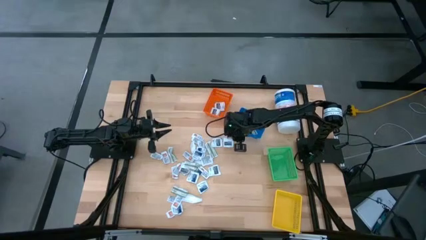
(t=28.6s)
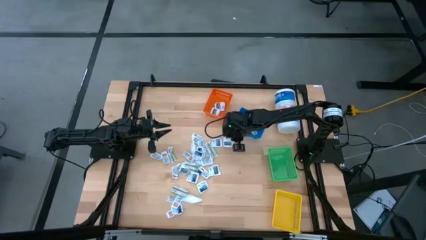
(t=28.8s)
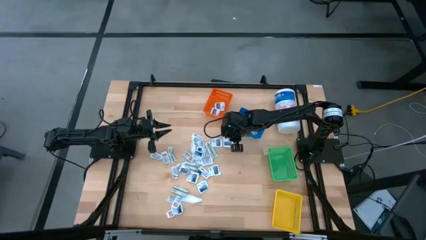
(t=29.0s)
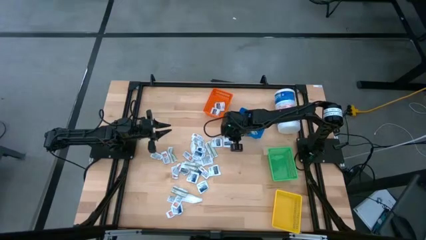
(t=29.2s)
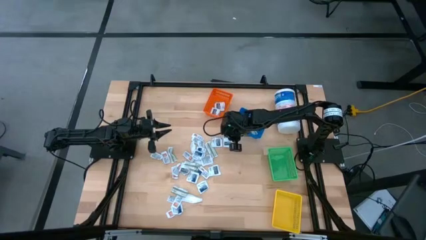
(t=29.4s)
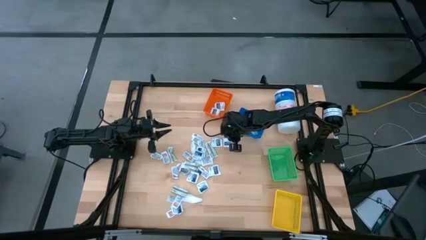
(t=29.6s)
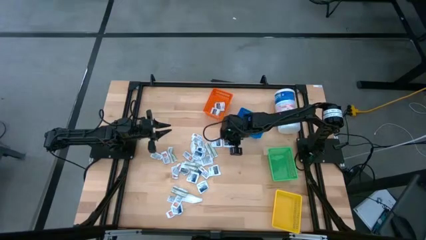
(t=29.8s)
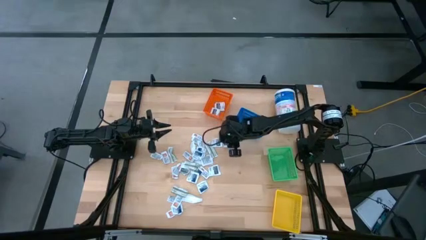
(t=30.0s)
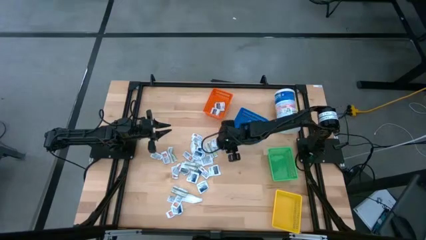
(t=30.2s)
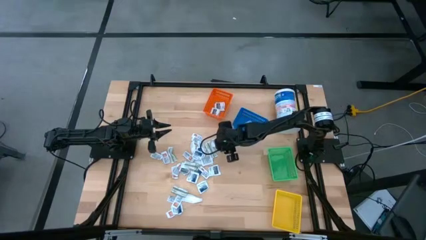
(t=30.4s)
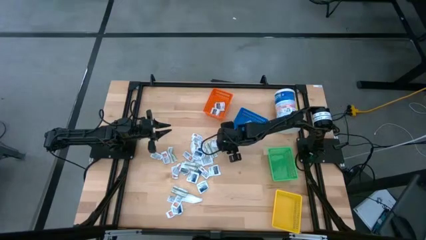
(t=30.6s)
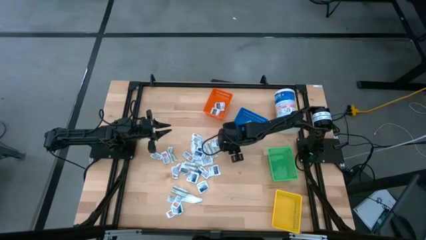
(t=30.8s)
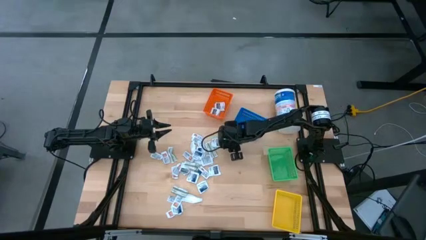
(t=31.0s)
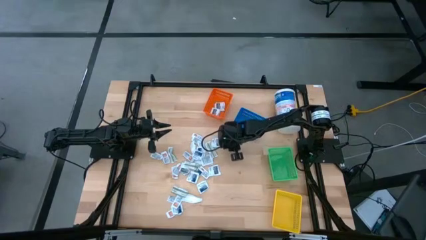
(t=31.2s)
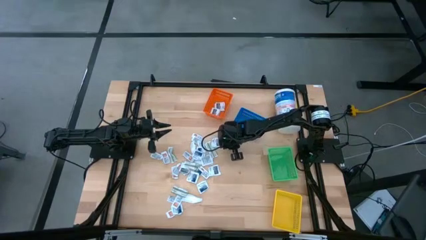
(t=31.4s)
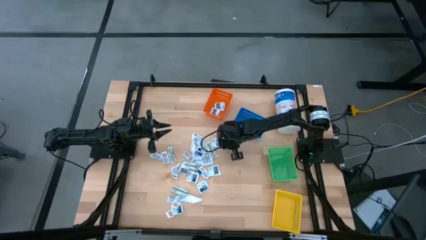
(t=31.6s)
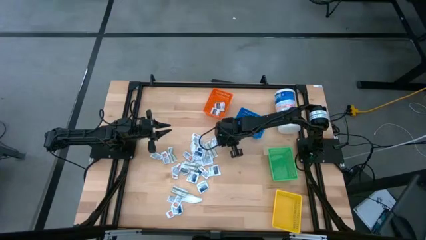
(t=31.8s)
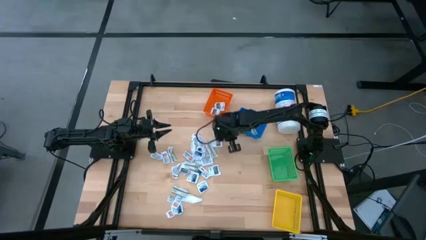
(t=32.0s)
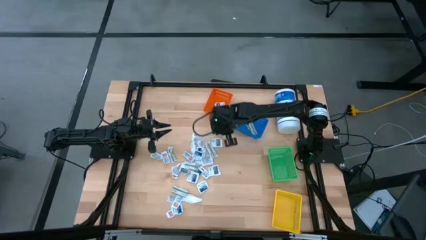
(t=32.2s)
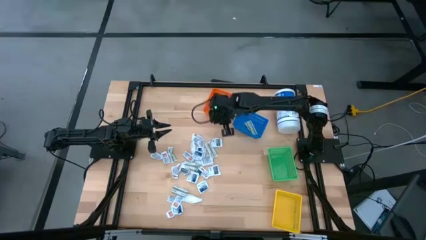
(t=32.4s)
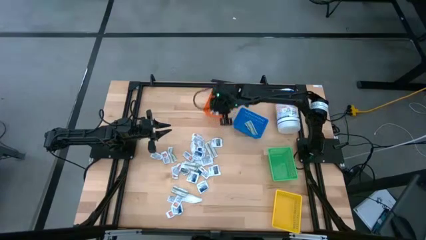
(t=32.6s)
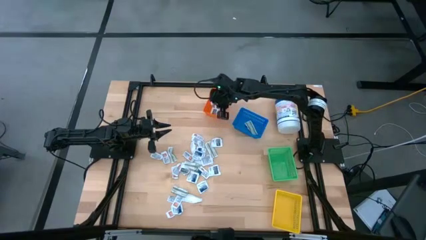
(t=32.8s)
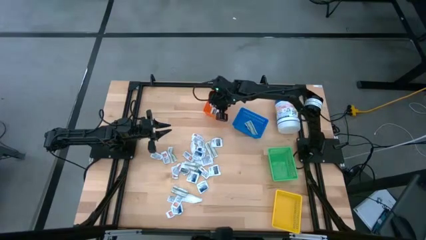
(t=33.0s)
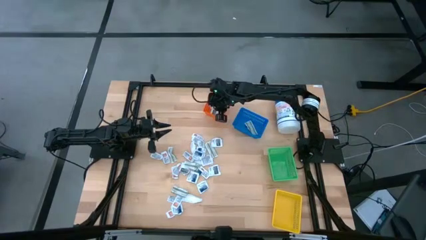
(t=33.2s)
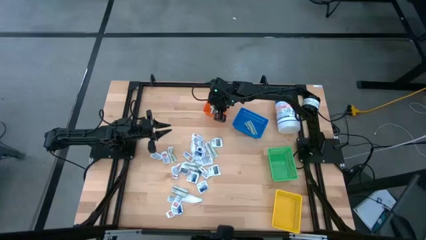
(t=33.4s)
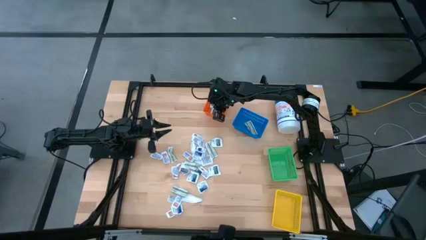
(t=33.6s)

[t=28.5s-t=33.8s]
Task: Pick & Place First Aid Supplies
Put the gray towelette pack into the orange basket

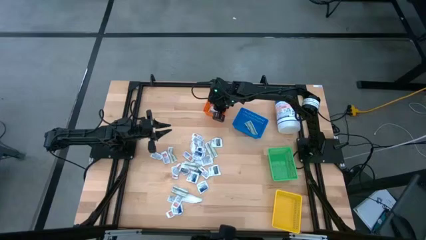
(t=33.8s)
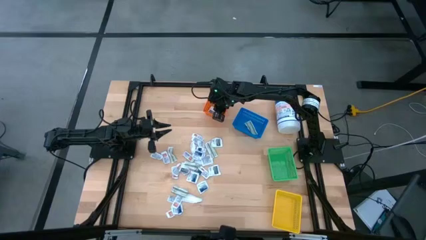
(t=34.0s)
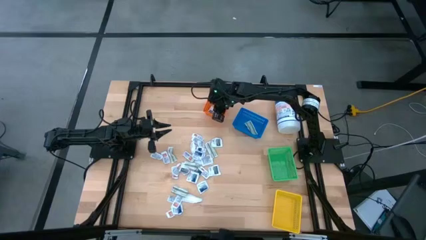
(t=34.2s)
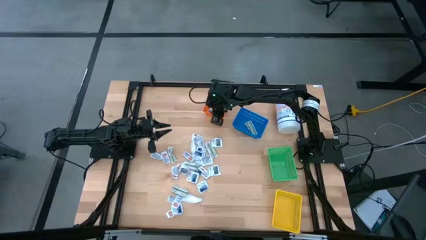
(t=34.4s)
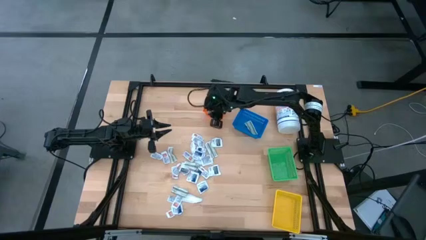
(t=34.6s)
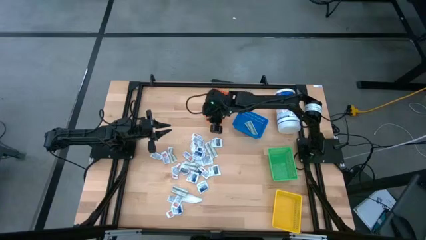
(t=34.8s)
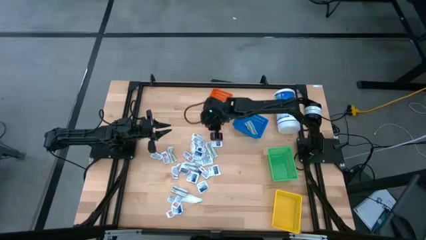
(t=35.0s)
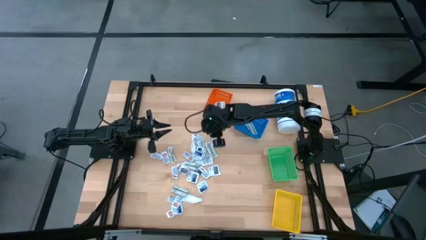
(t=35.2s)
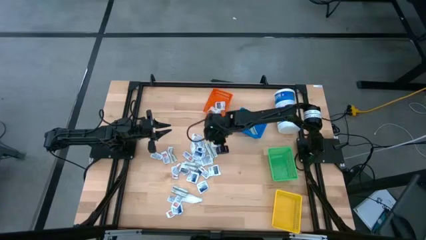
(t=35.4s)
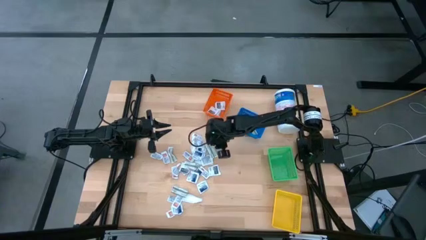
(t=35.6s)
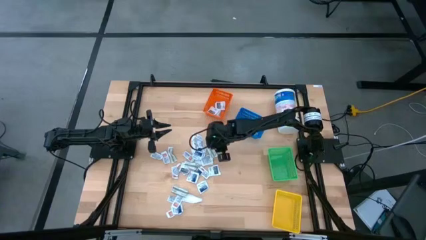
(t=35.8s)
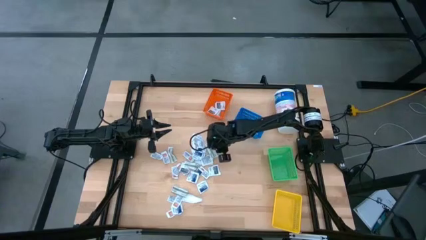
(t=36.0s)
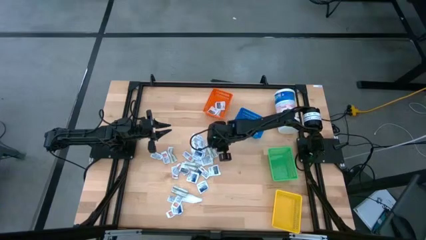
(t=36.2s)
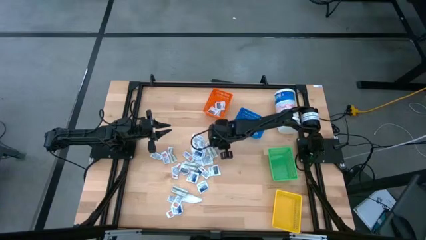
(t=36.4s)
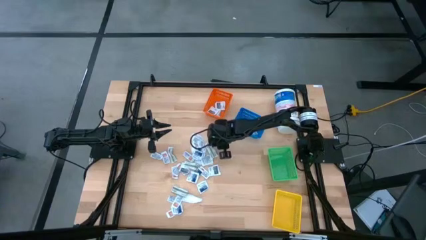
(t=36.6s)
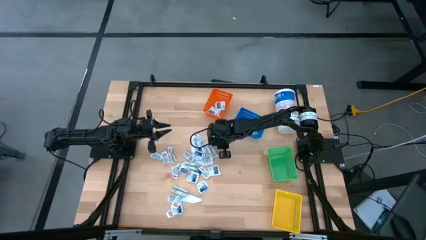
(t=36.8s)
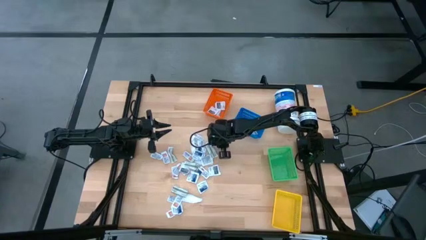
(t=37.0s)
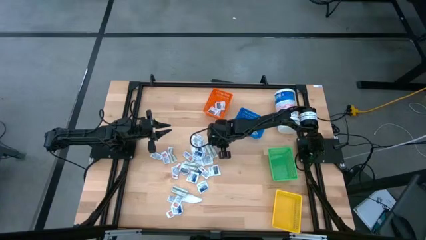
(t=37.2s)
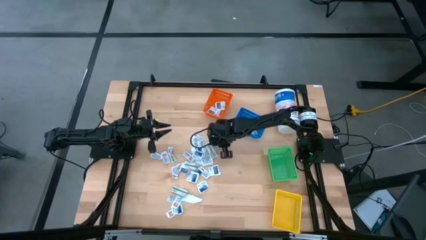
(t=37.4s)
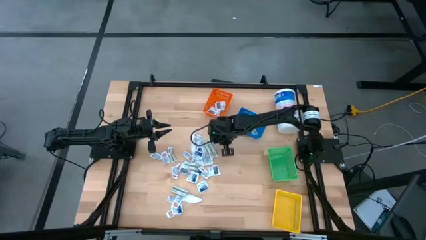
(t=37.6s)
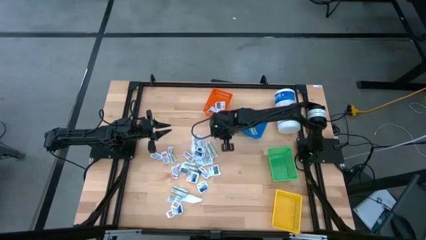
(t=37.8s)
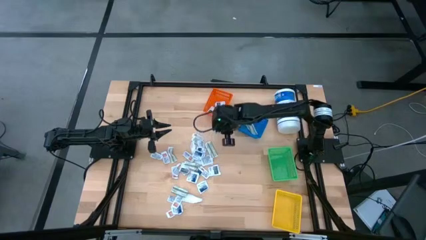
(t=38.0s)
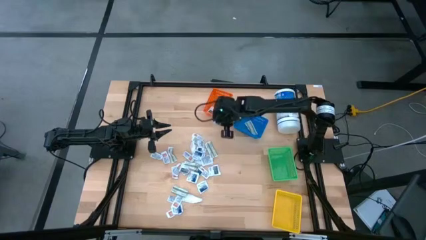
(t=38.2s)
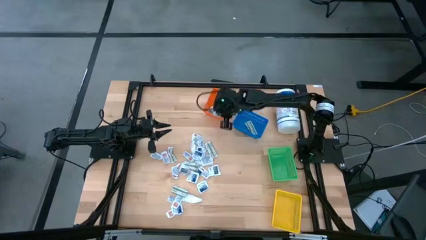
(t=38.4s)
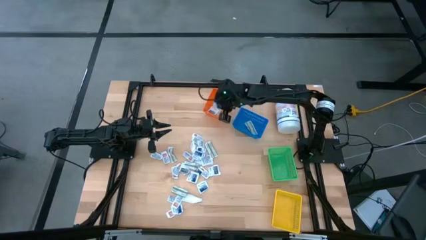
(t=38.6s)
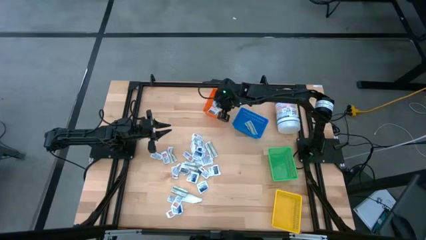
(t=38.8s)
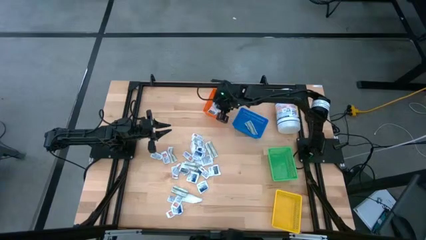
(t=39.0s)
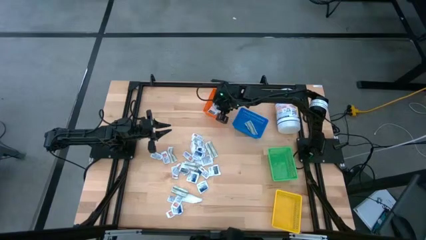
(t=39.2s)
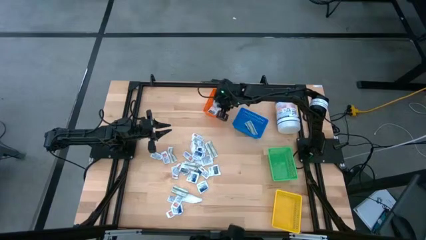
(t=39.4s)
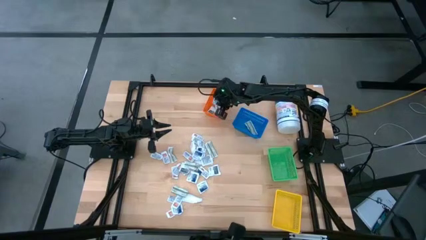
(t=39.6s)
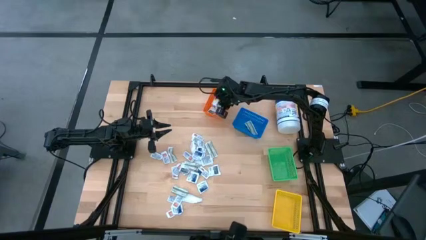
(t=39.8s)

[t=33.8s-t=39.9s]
Put the gray towelette pack into the orange basket

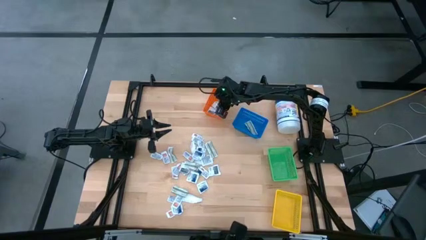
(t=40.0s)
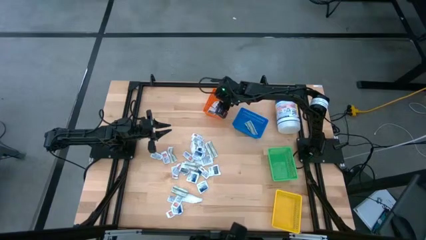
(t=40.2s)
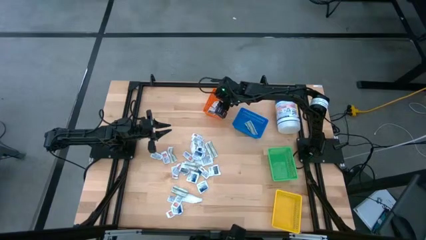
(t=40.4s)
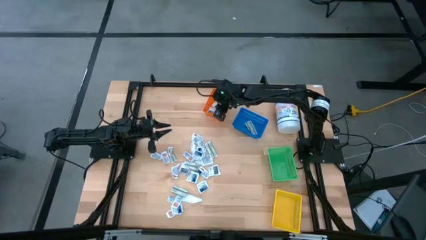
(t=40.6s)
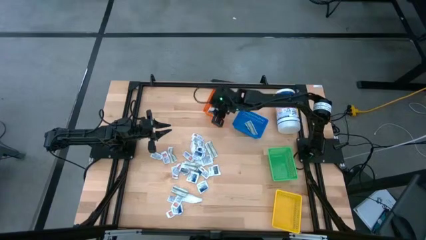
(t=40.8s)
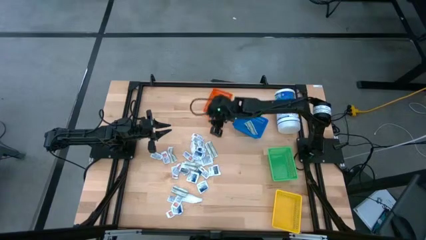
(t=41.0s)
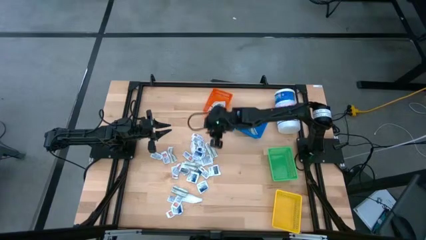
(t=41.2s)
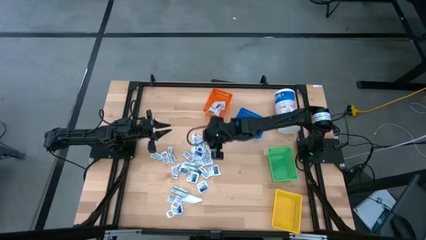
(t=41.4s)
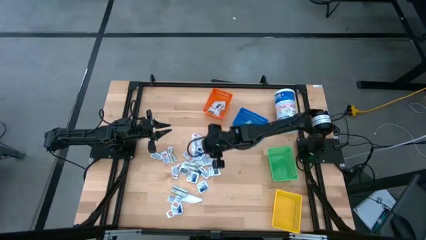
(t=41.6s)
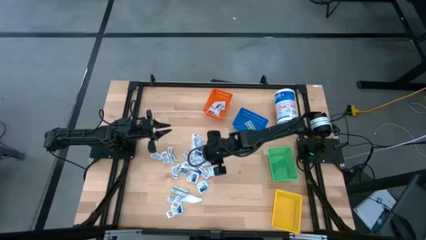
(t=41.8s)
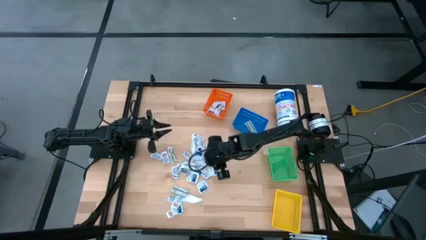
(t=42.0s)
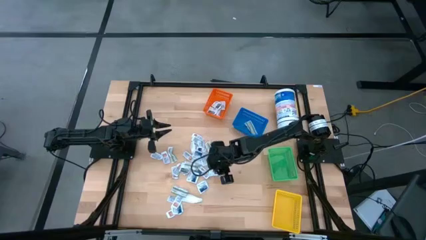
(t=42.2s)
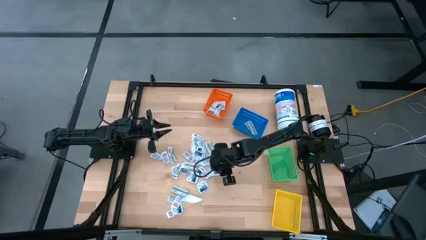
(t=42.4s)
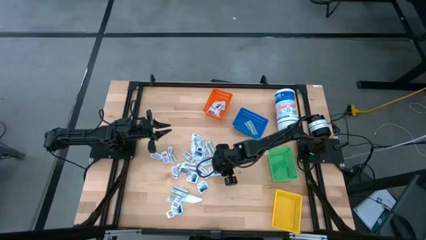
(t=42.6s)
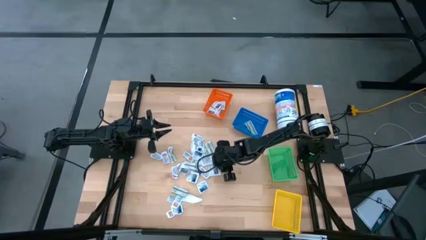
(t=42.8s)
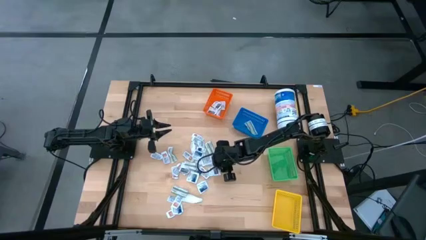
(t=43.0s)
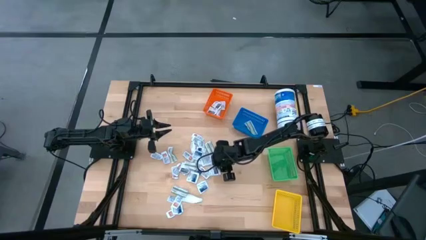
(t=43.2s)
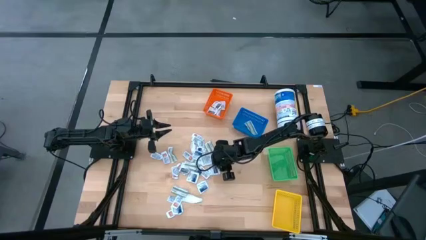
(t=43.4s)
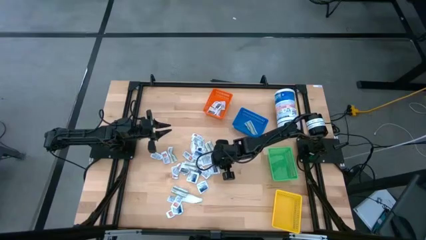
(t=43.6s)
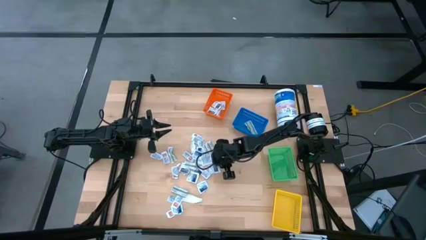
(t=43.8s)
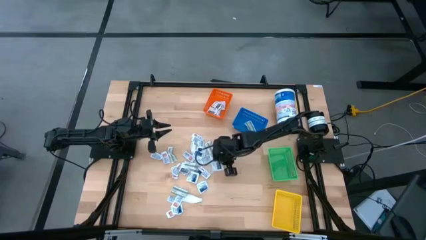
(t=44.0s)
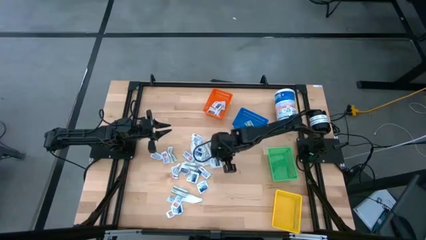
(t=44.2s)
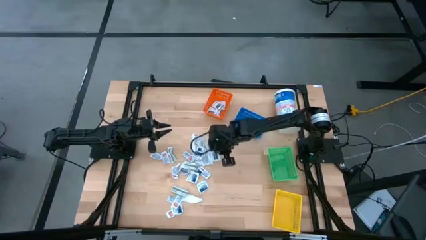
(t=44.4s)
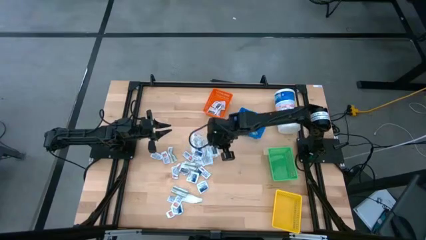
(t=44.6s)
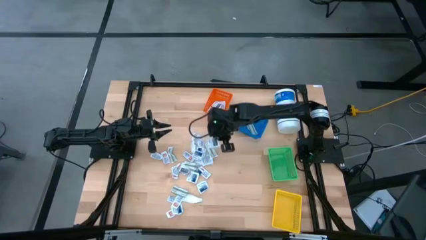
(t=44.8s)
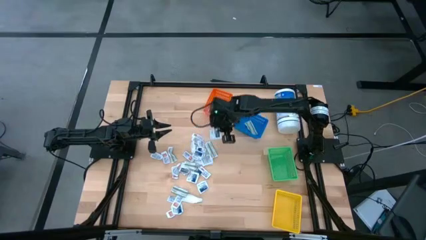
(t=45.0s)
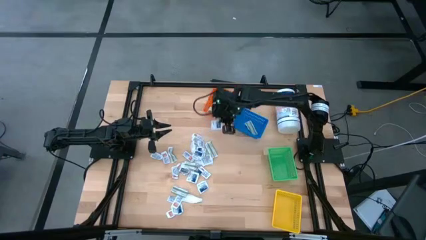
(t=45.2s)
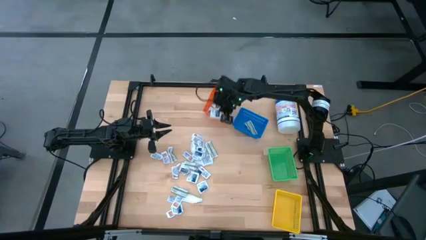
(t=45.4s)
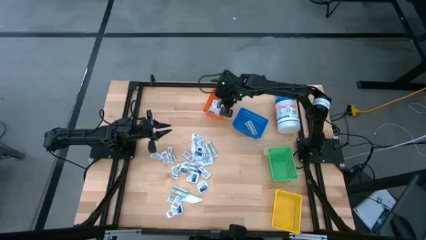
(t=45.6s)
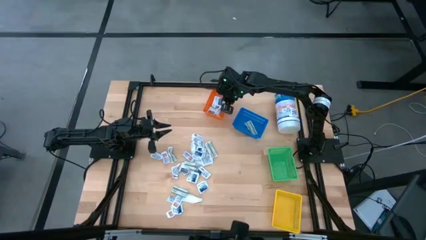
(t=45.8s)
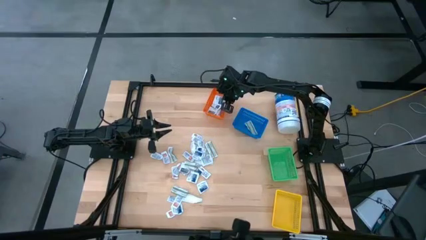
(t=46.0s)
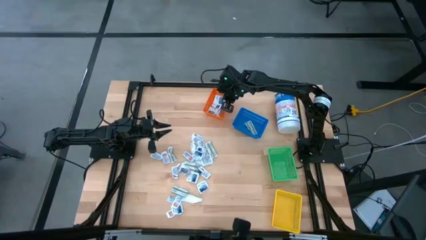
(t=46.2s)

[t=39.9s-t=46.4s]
Put the gray towelette pack into the orange basket
